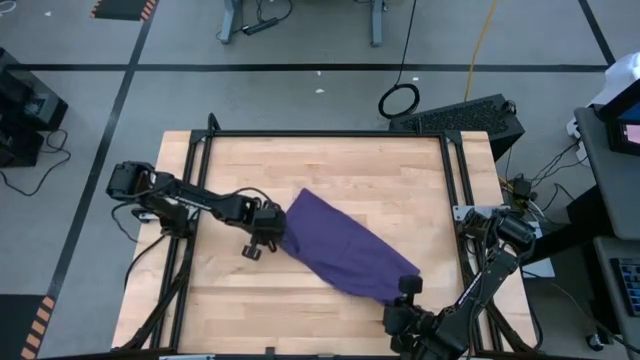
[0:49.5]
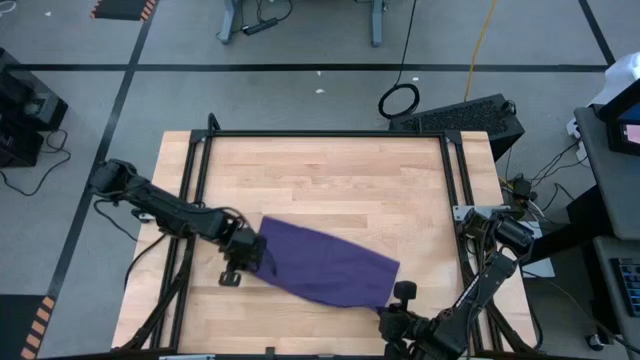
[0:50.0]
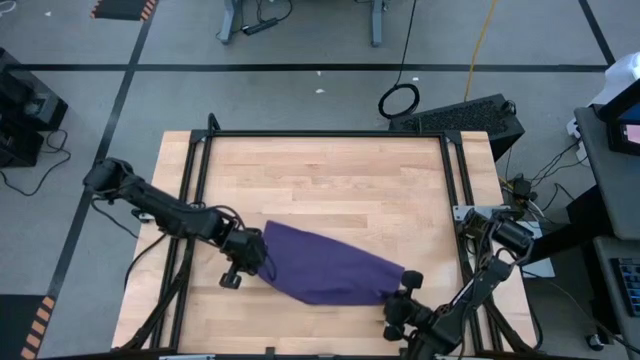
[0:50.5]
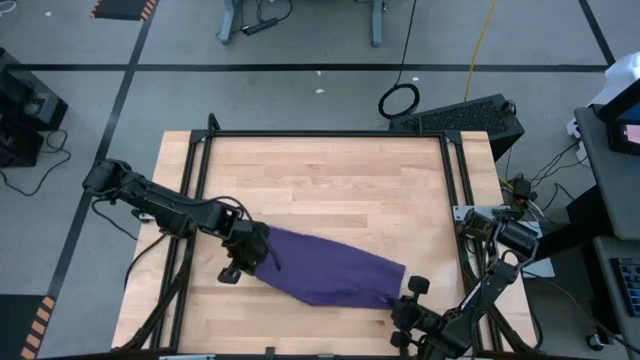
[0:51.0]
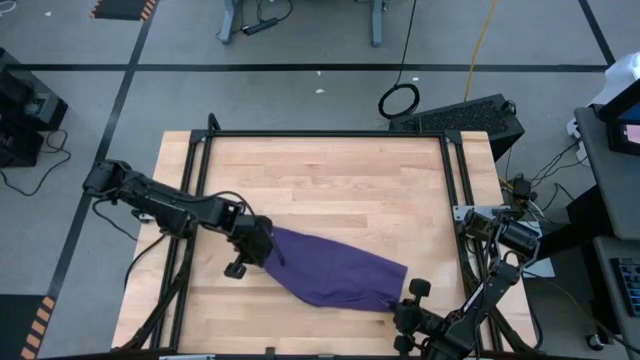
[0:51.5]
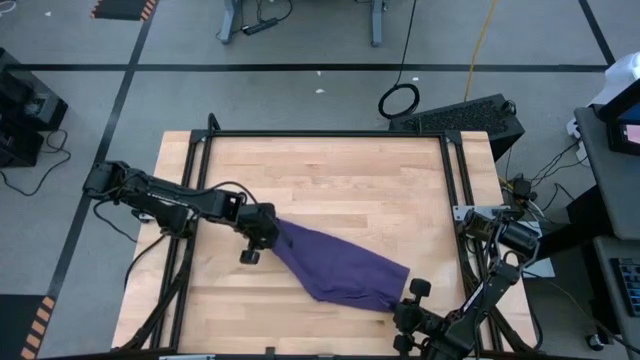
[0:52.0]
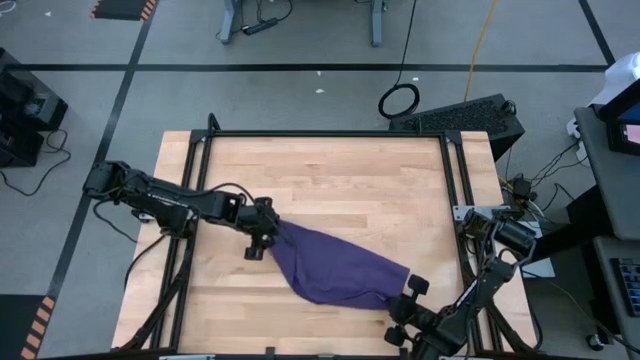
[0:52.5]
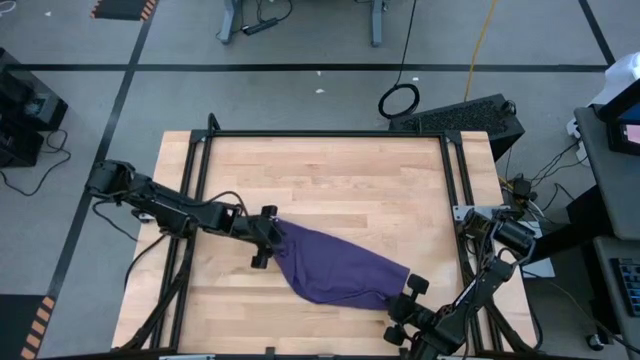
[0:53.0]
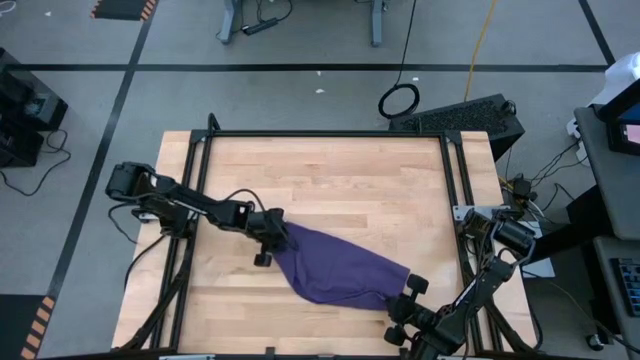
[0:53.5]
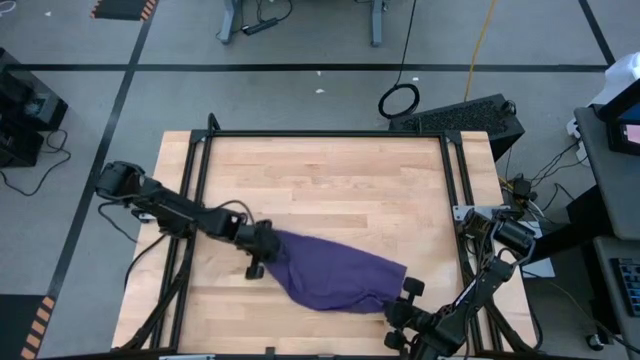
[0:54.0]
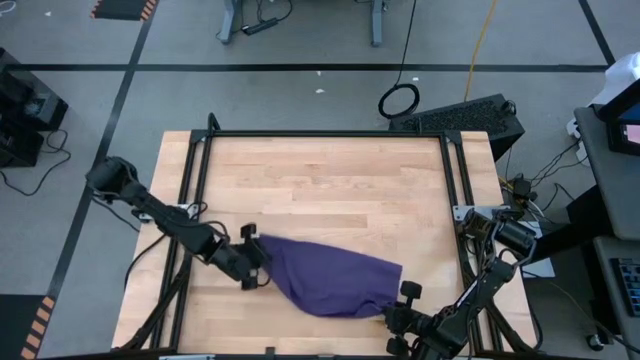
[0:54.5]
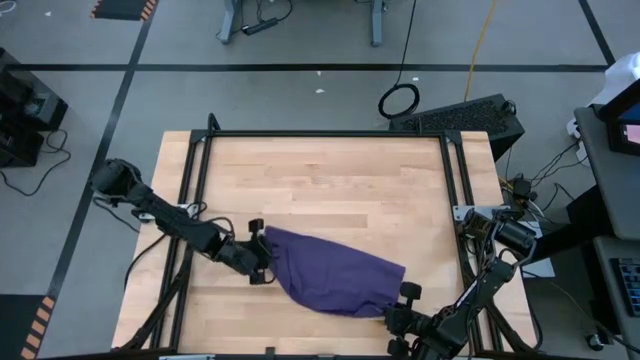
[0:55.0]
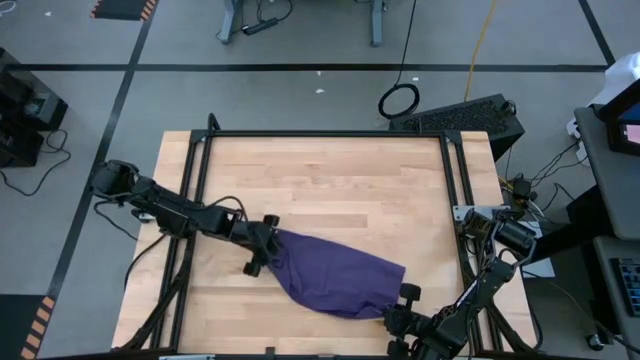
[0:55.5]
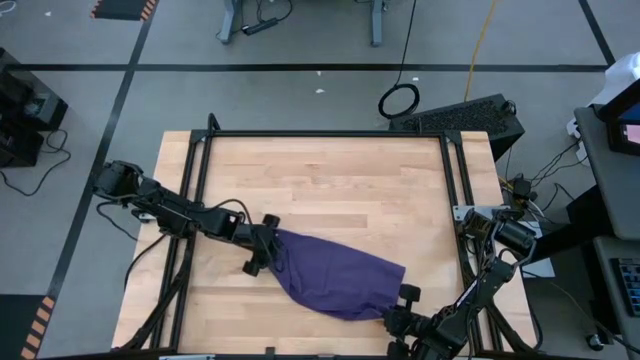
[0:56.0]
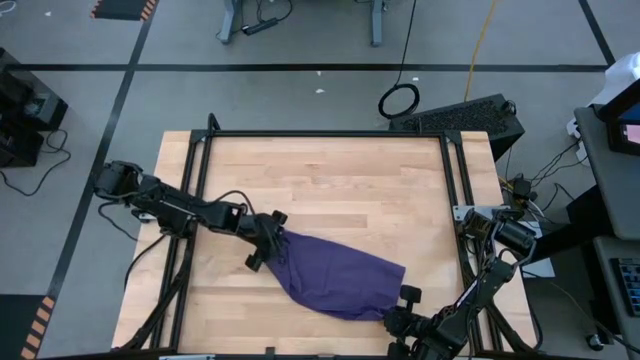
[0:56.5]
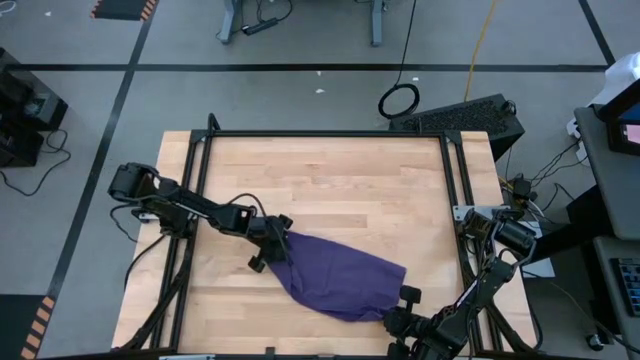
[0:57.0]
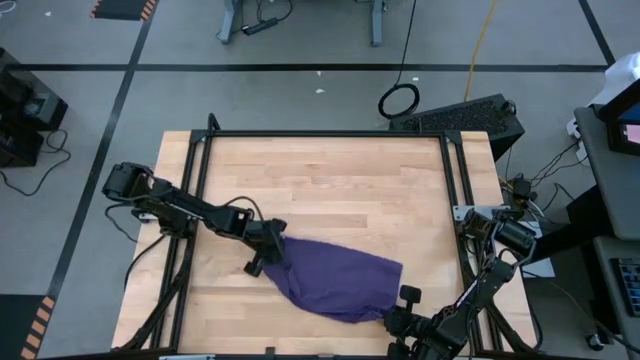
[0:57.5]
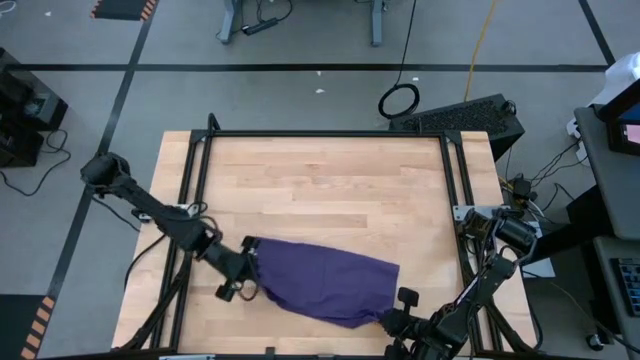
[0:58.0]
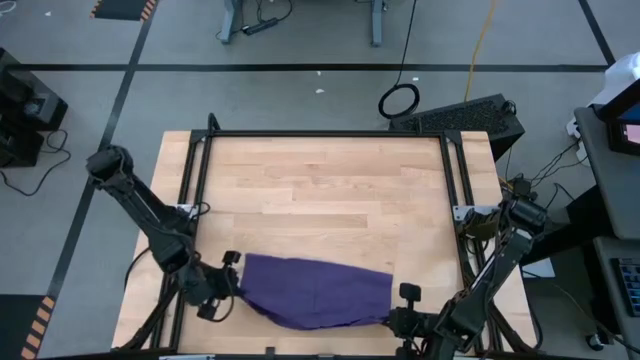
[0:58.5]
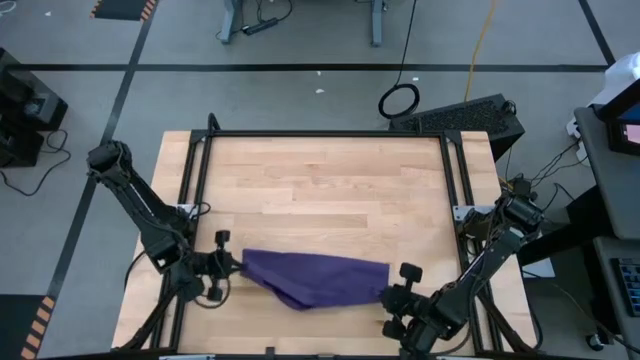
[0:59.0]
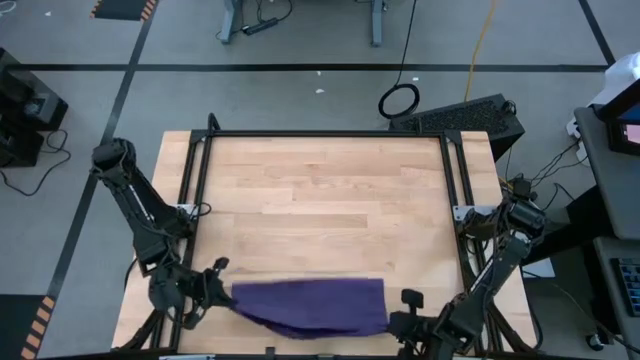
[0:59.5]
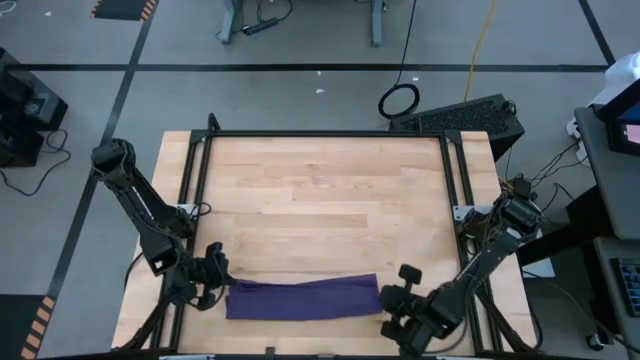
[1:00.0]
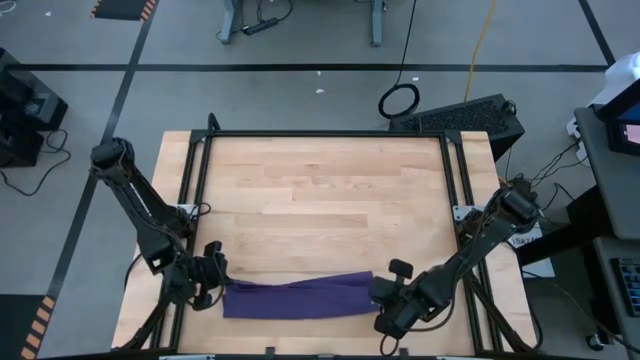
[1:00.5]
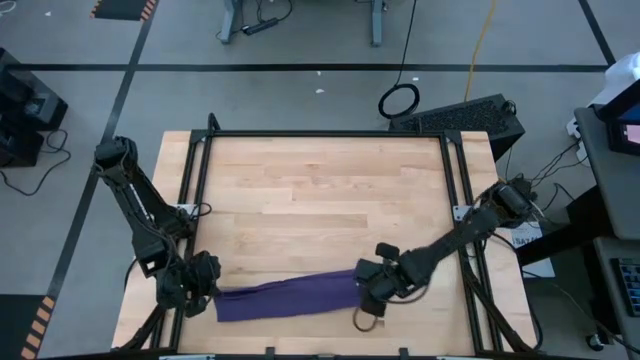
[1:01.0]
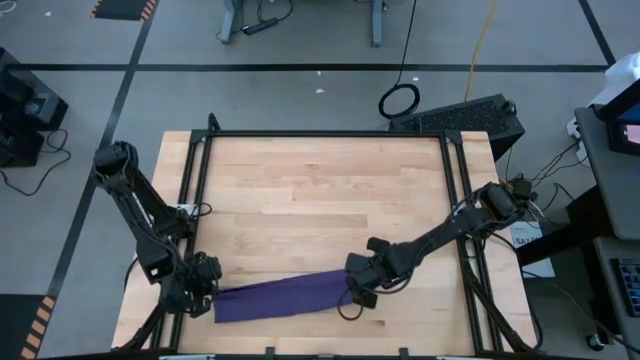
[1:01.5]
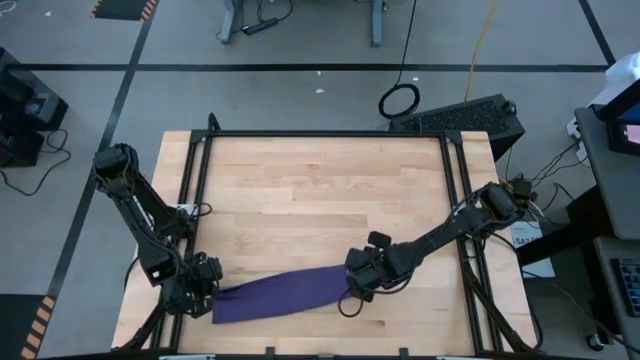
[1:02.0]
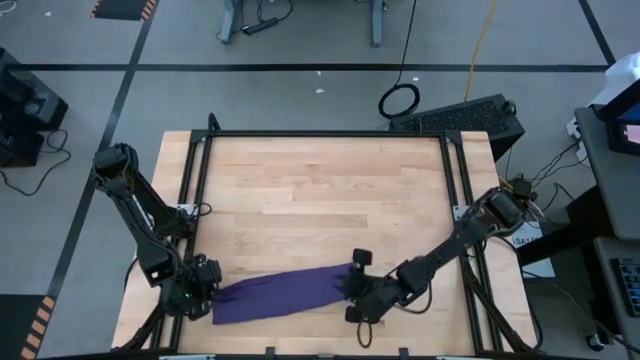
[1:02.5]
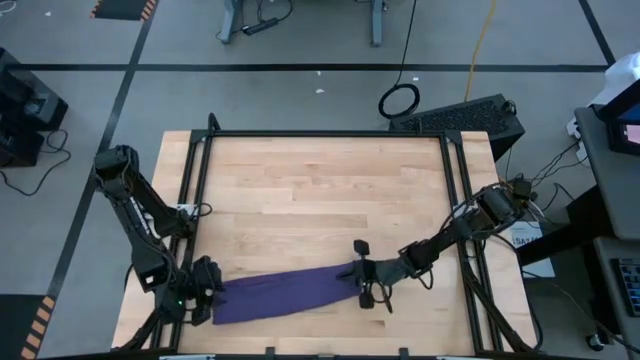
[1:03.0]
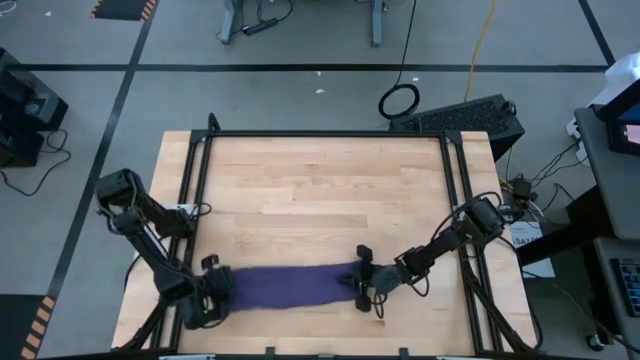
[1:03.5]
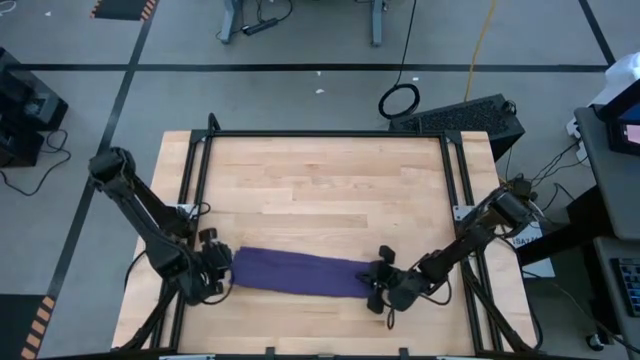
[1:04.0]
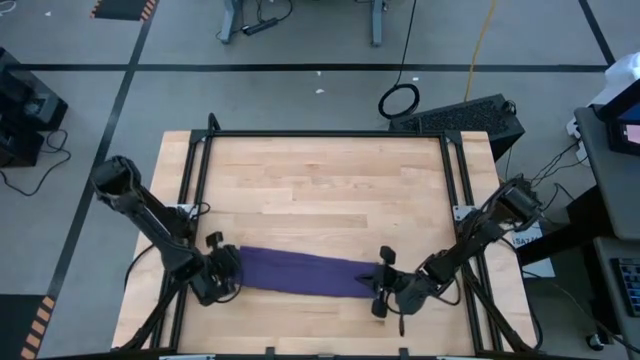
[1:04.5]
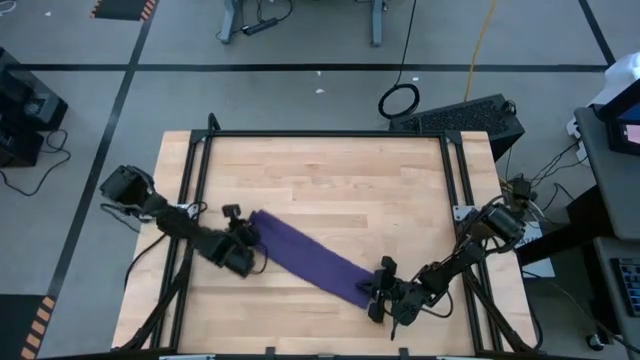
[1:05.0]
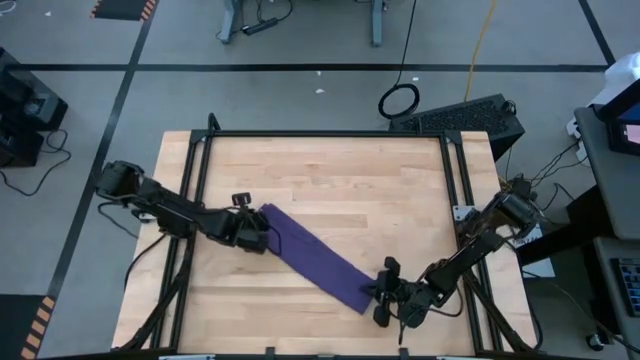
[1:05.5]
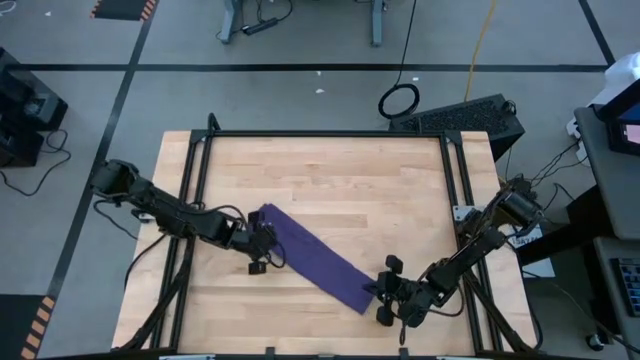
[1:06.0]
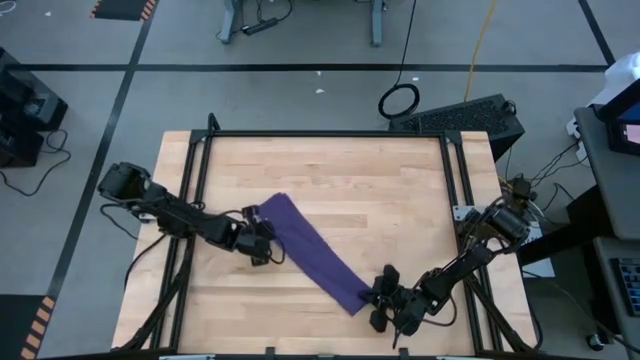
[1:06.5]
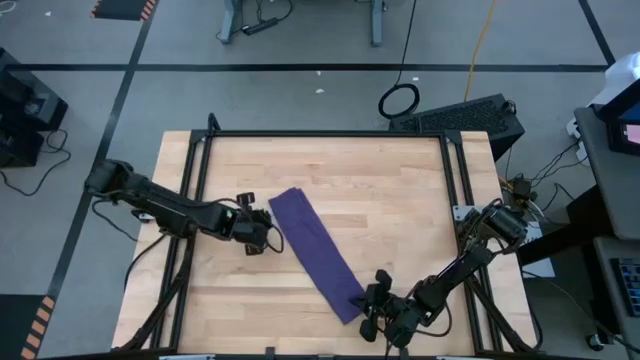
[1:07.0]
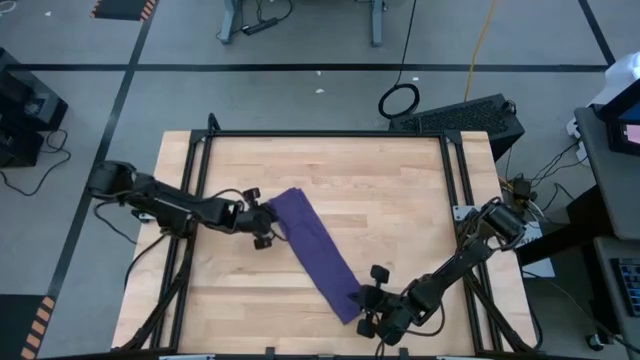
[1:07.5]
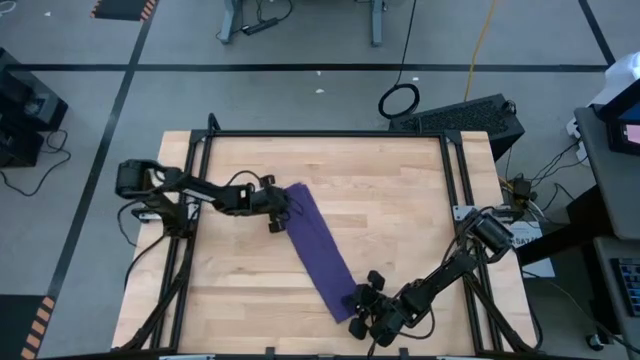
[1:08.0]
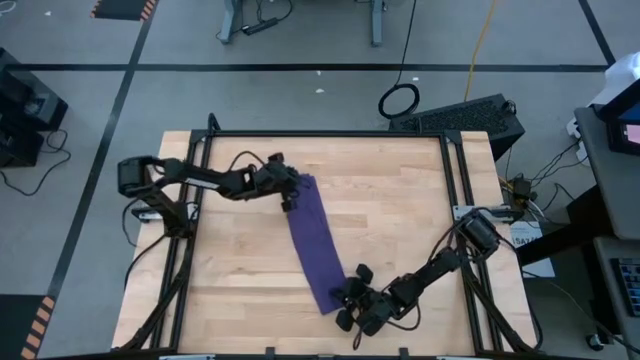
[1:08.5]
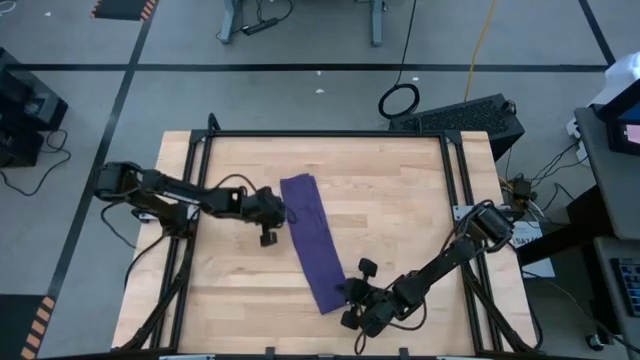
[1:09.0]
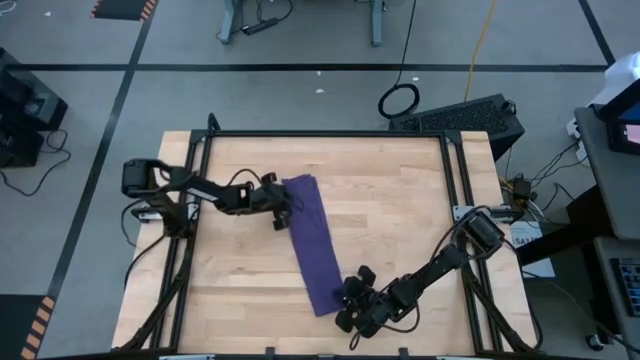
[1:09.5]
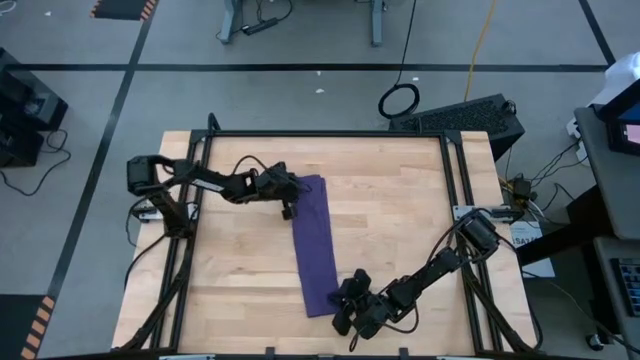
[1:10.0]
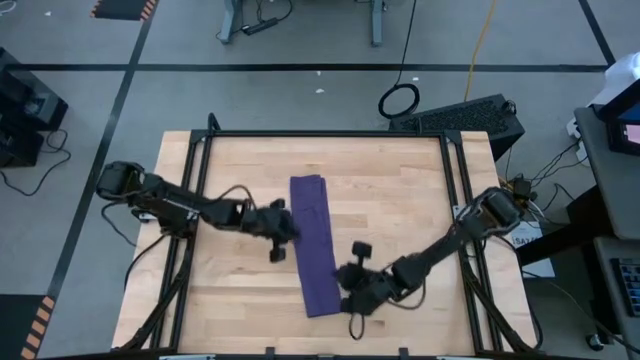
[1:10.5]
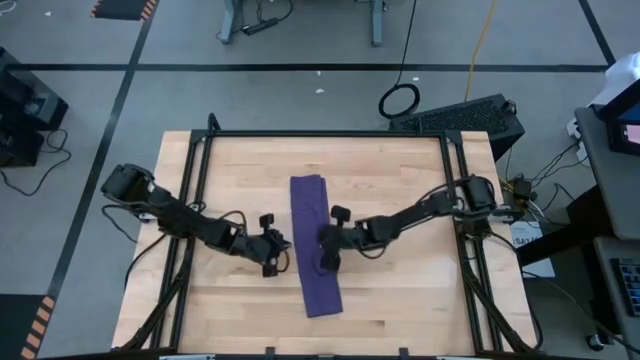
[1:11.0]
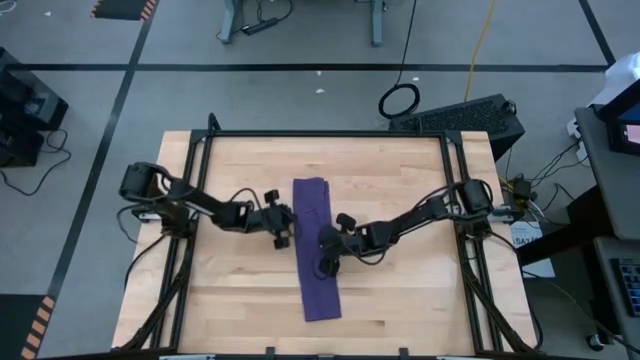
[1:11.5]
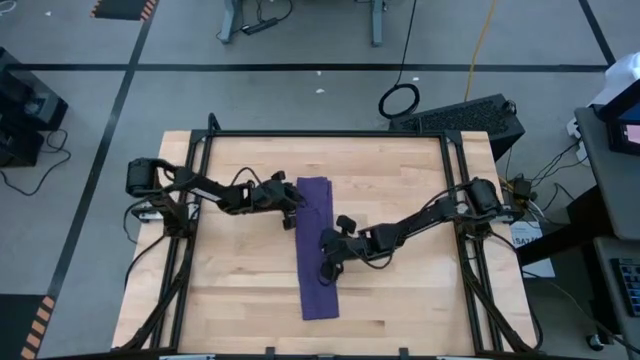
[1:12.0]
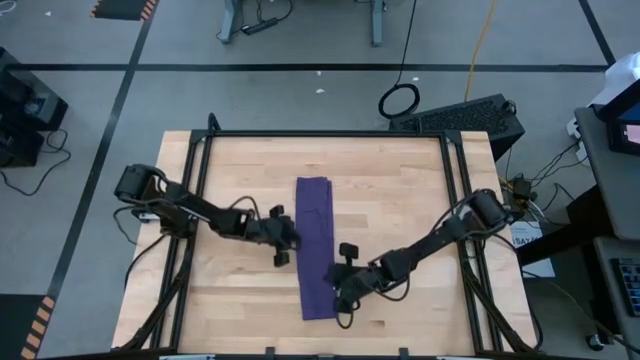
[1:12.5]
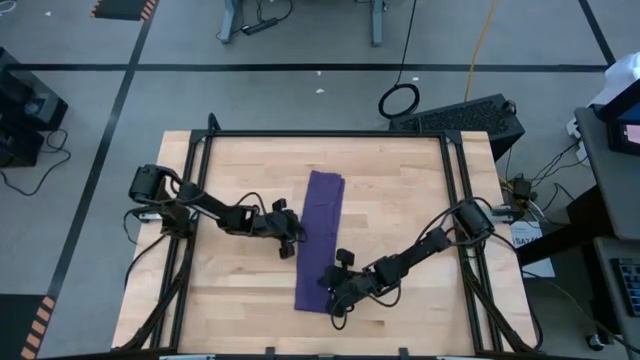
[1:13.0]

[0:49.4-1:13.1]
Task: Roll towel into tight, uniform cylinder
Fold the purple towel on the table
